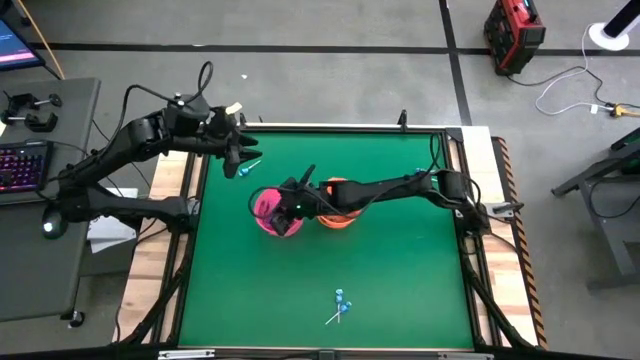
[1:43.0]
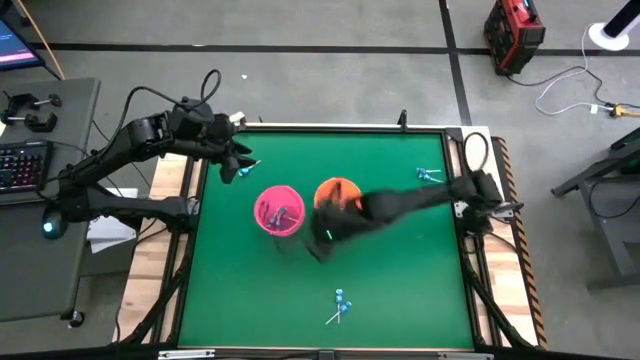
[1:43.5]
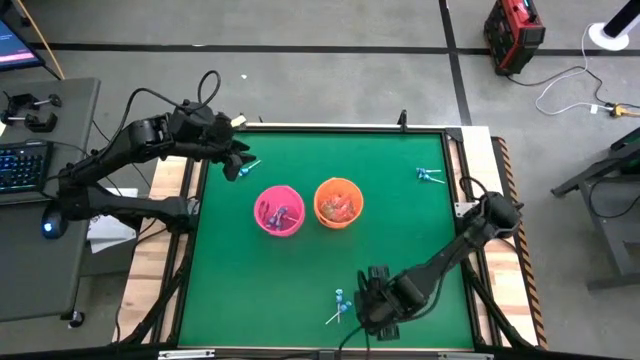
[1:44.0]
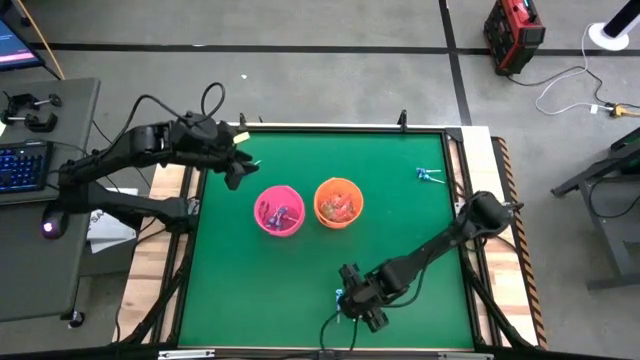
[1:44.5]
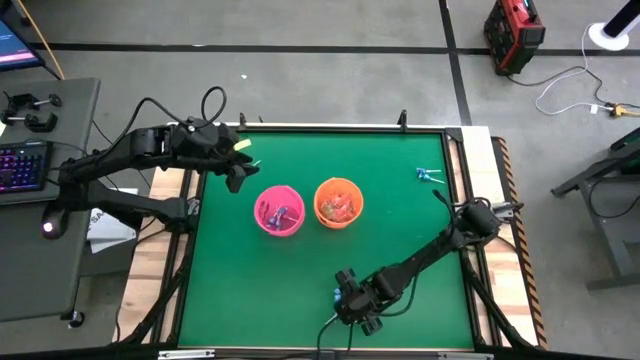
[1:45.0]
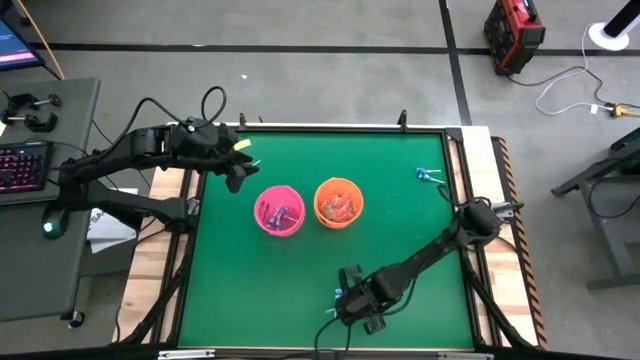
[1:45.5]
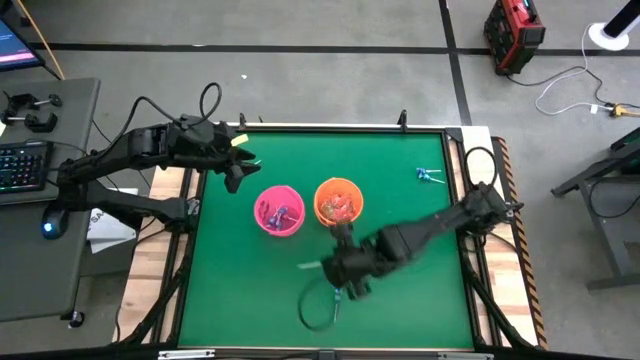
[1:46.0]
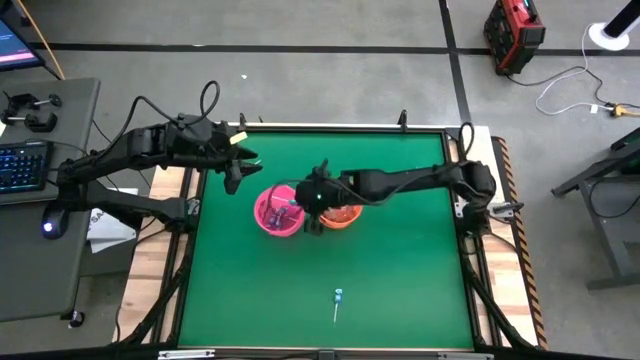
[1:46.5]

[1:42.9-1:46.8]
Task: Sort candy by brand, put in halloween buckets
Put the blue lollipop into the pink bucket

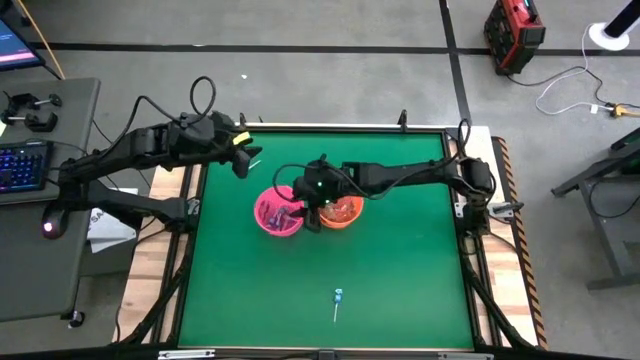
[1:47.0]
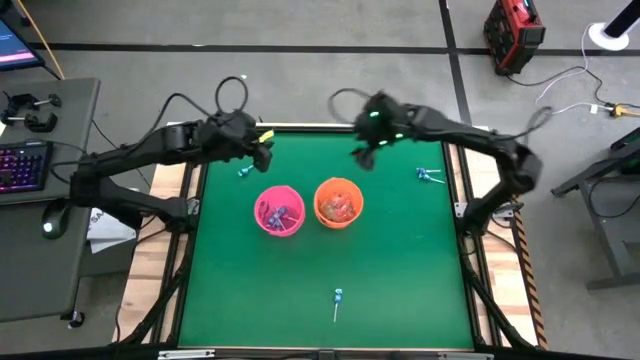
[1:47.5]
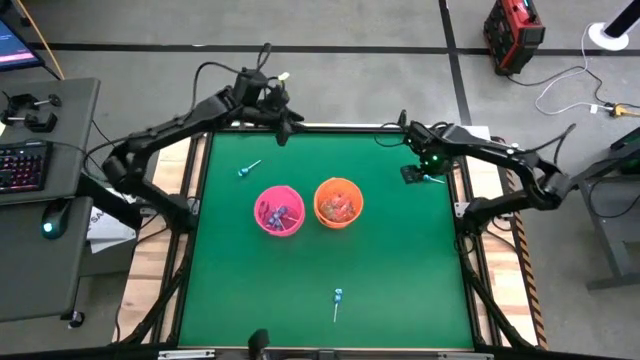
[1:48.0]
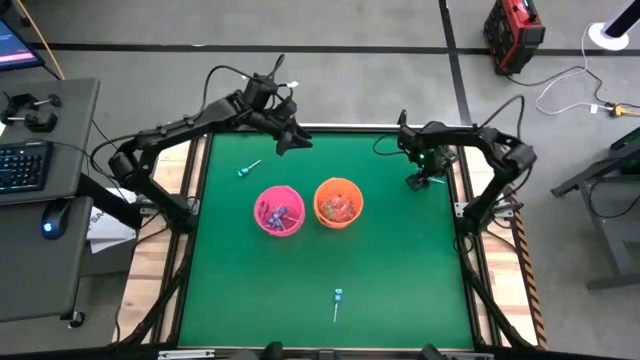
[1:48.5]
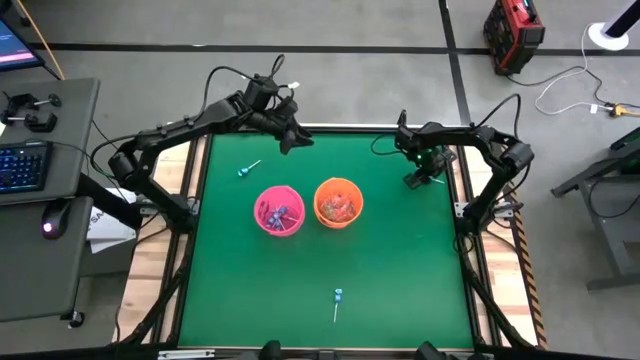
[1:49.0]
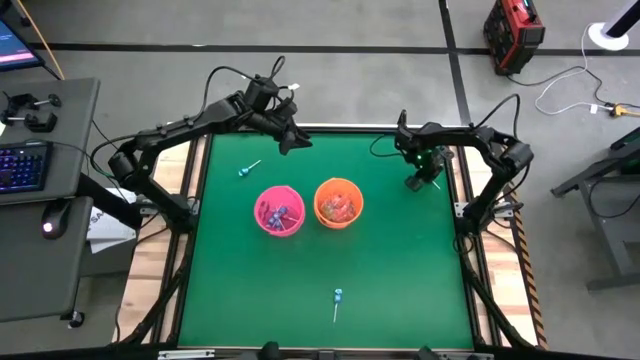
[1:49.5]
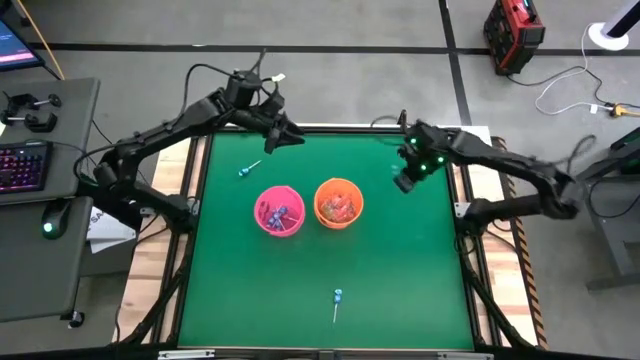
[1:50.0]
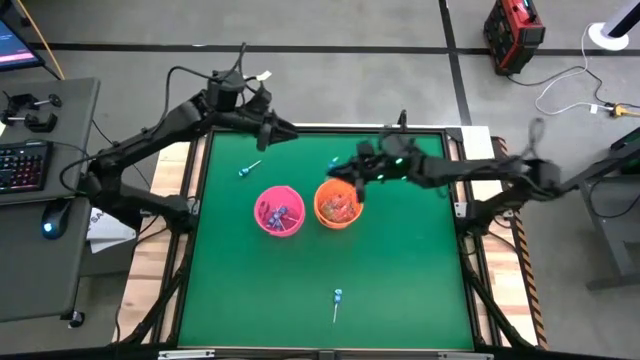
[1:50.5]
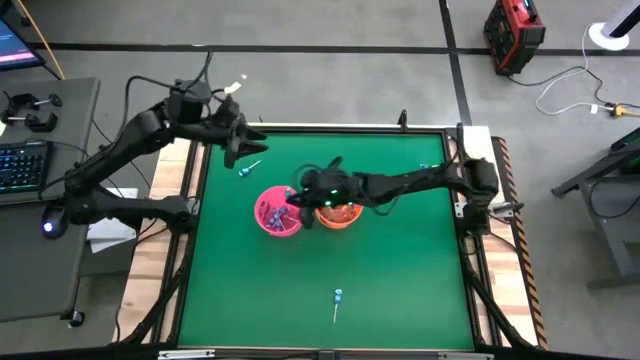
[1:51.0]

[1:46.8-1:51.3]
Put the blue lollipop into the pink bucket

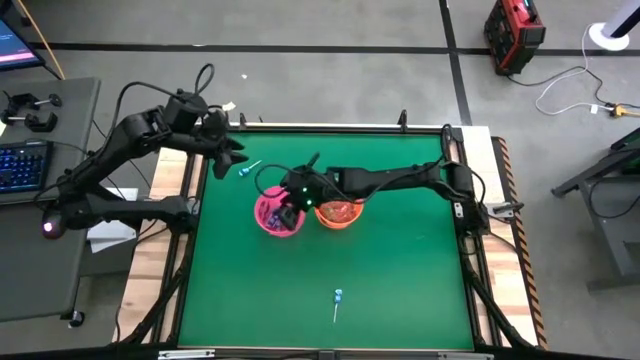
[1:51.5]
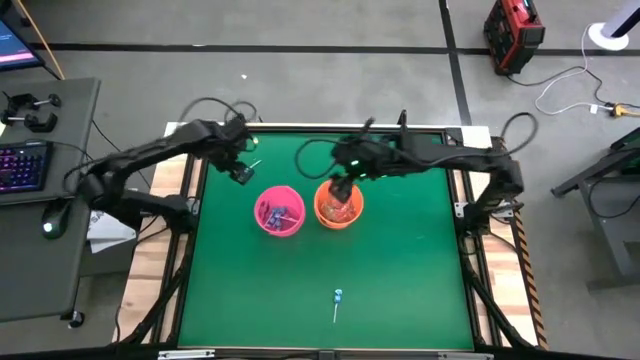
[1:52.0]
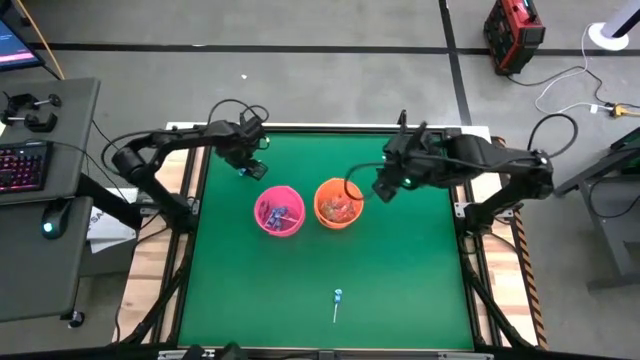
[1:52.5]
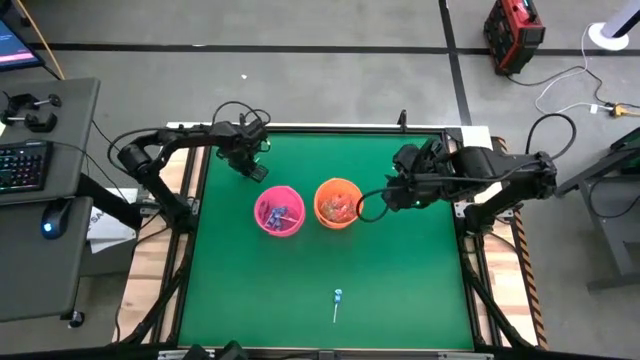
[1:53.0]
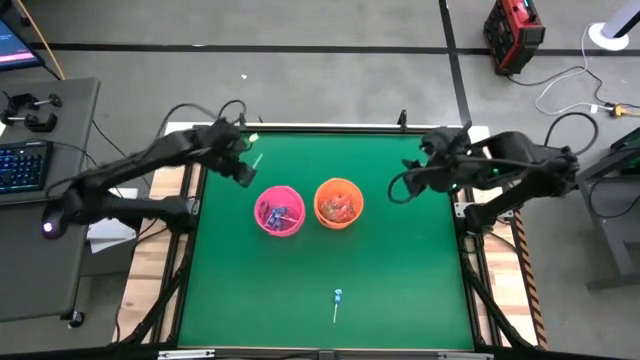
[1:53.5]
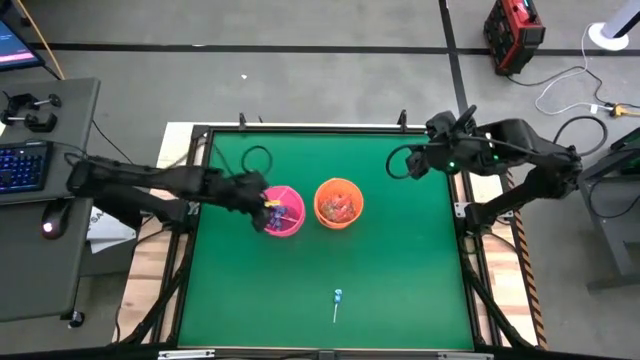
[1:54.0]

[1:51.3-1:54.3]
Put the blue lollipop into the pink bucket

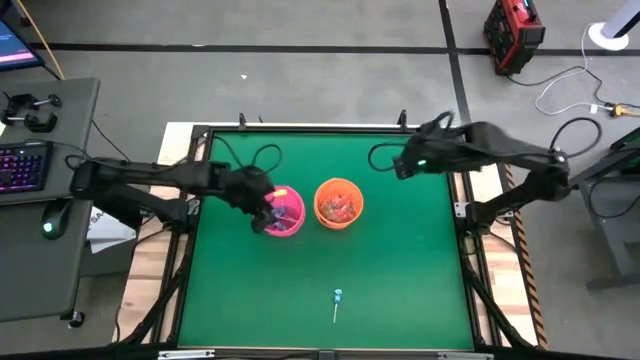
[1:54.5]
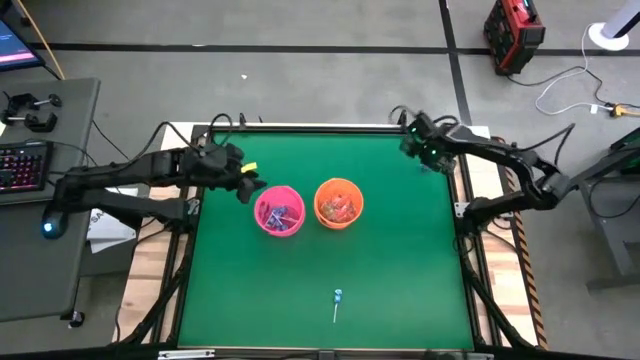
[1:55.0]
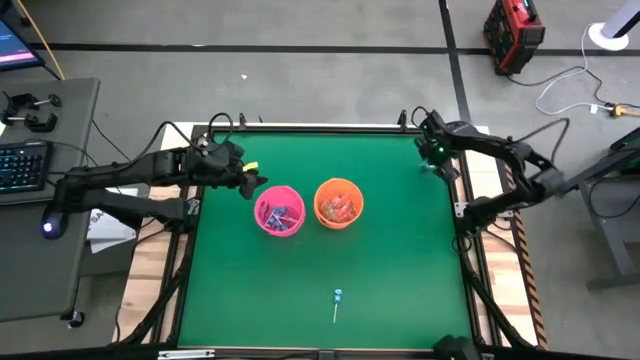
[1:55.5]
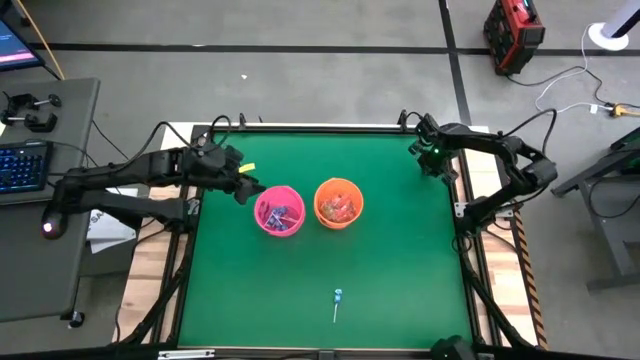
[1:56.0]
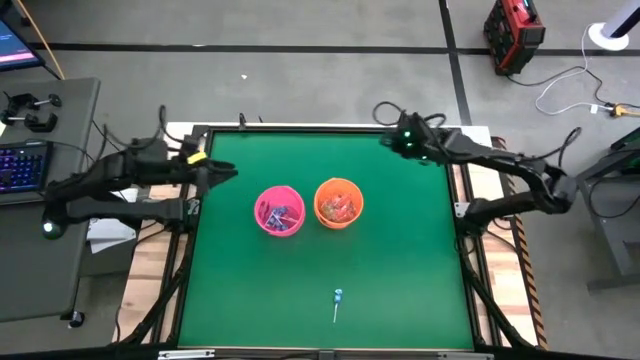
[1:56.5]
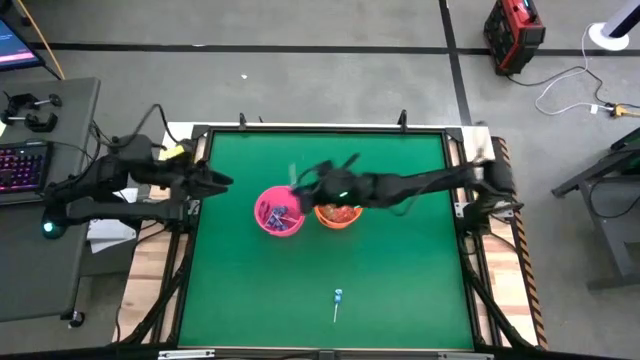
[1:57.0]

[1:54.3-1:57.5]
Put the blue lollipop into the pink bucket

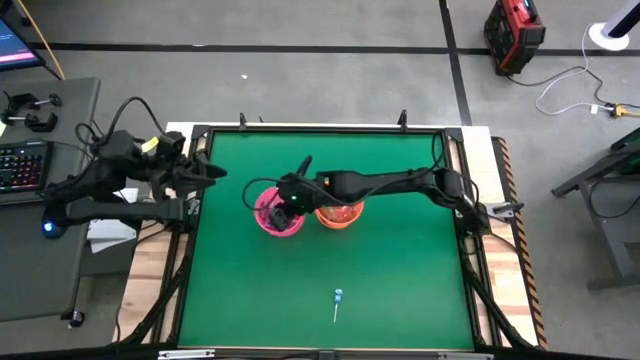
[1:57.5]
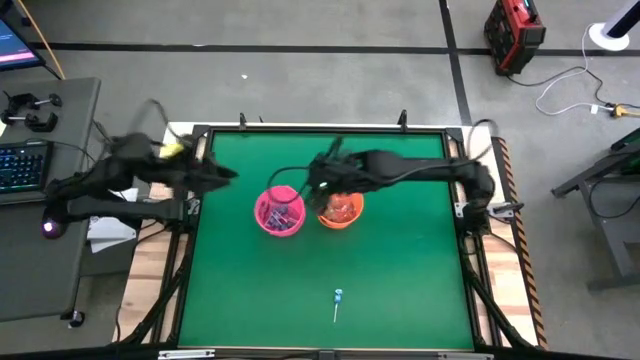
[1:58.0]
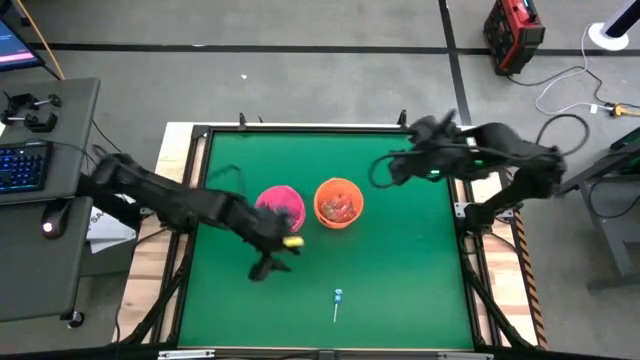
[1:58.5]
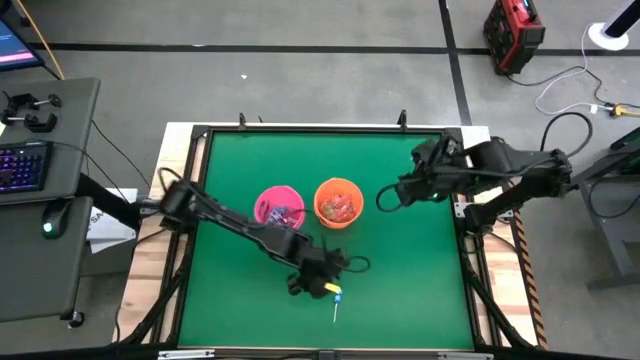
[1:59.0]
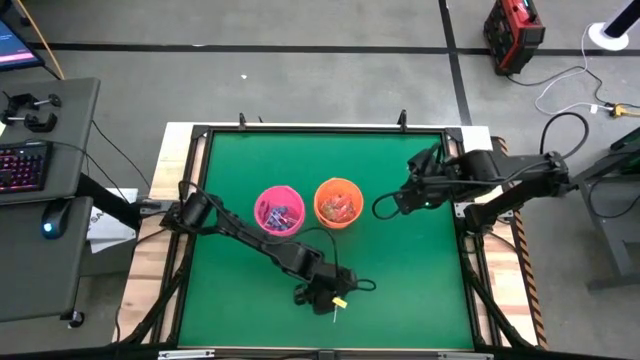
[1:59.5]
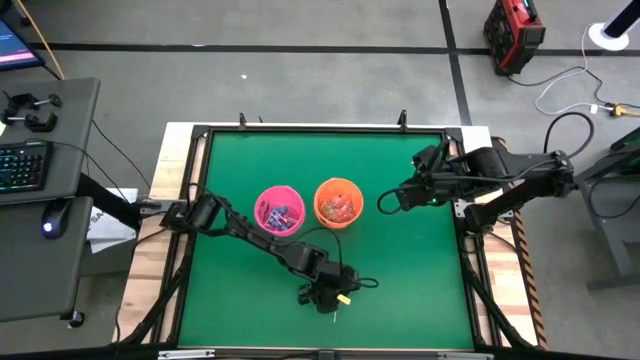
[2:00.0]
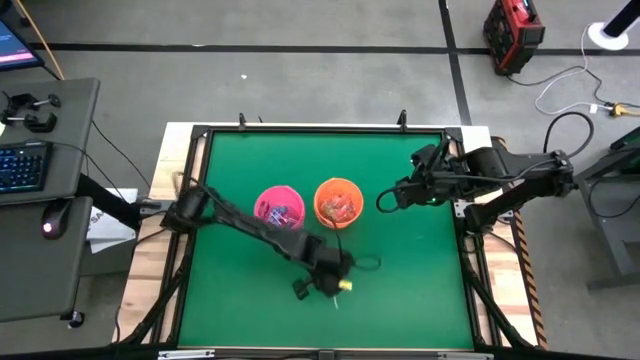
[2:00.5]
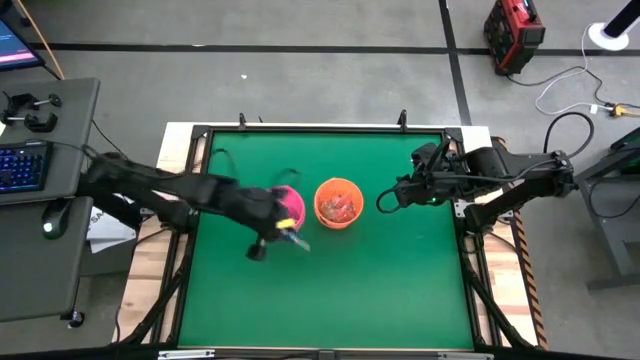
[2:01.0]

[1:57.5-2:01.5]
Put the blue lollipop into the pink bucket

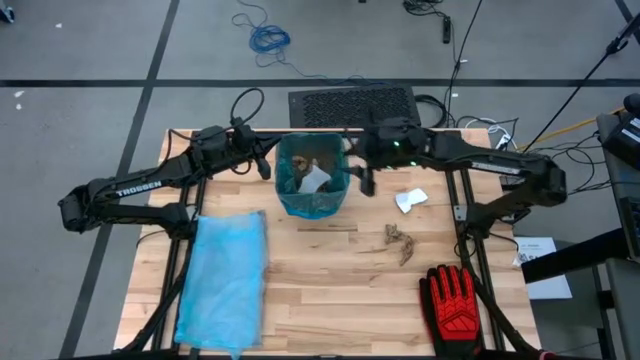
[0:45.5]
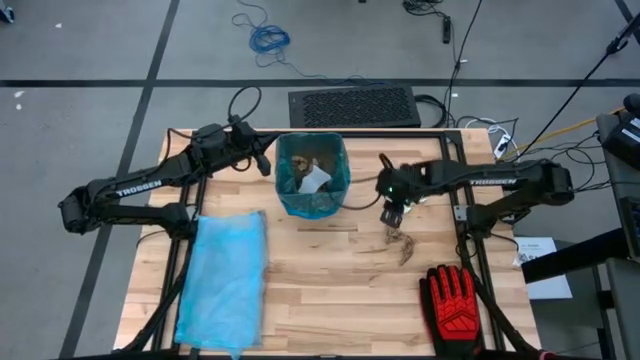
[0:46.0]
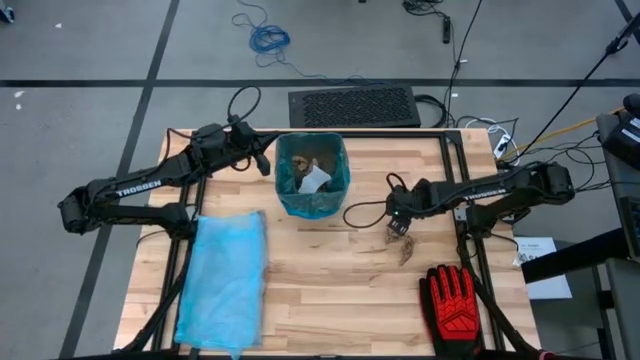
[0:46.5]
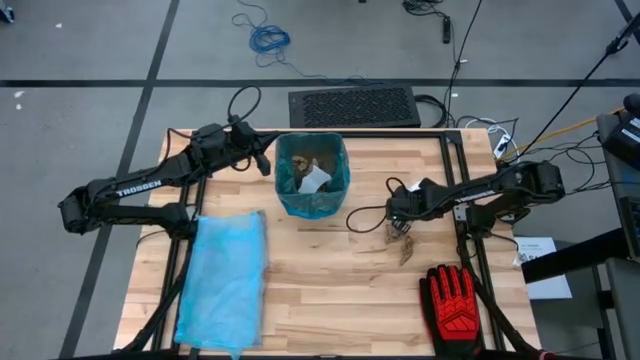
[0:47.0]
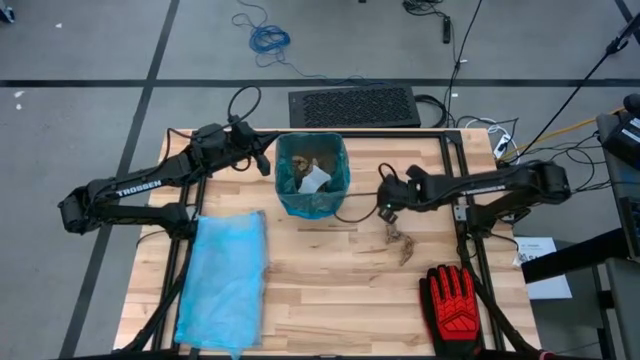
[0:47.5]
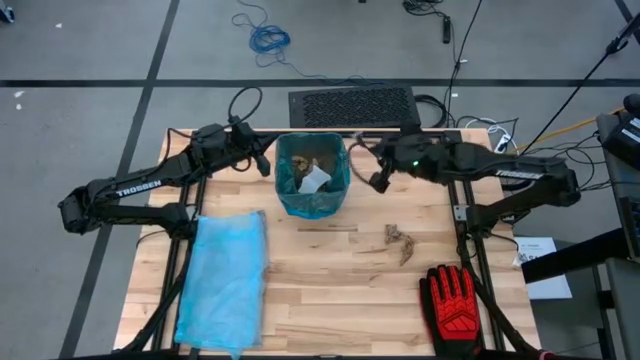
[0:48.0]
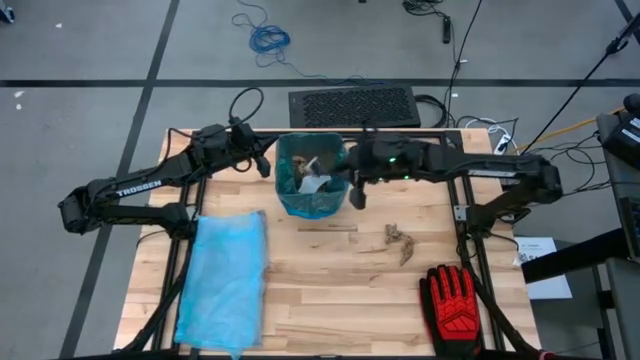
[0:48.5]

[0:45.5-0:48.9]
Task: place trash/remove bag and relplace
Put the white paper into the black trash bin
